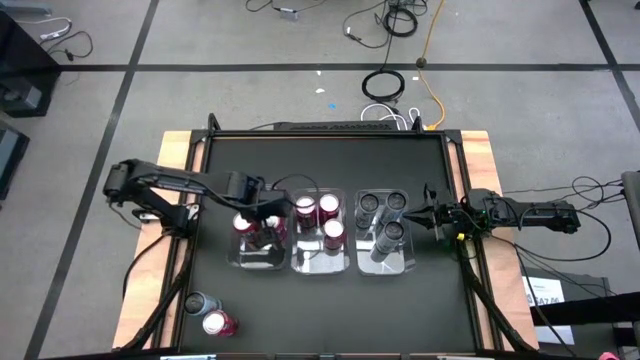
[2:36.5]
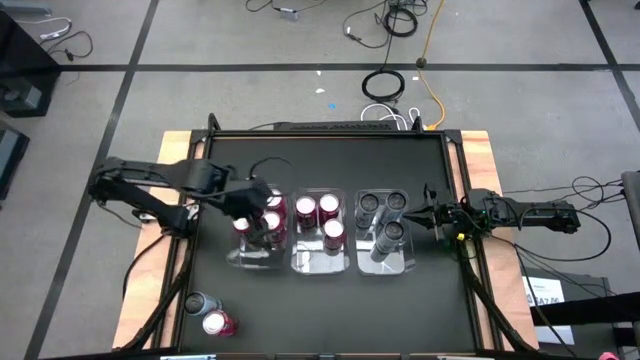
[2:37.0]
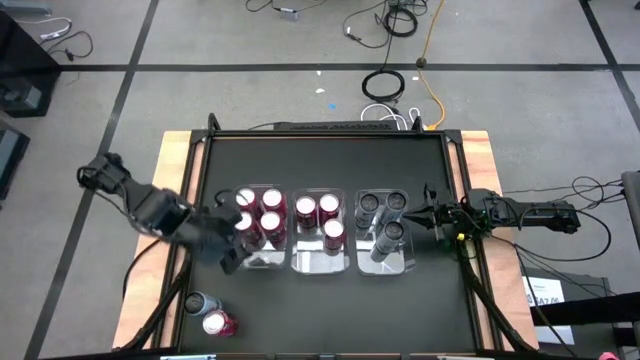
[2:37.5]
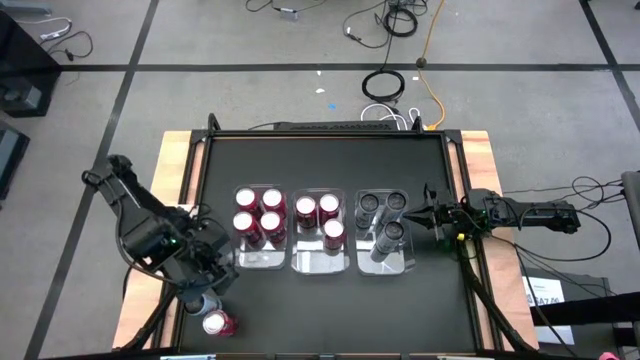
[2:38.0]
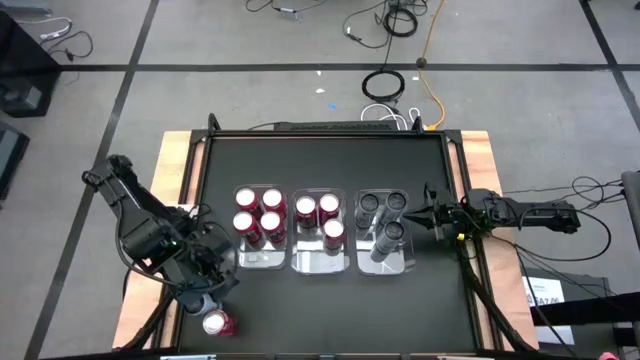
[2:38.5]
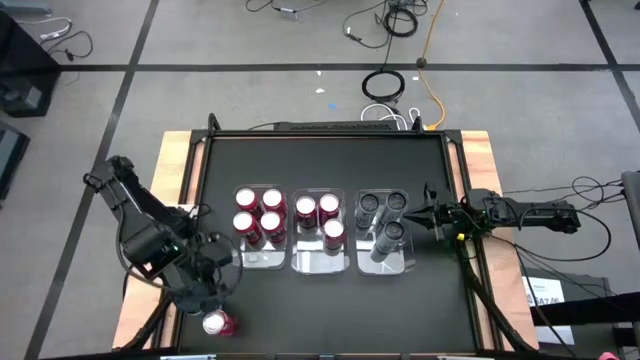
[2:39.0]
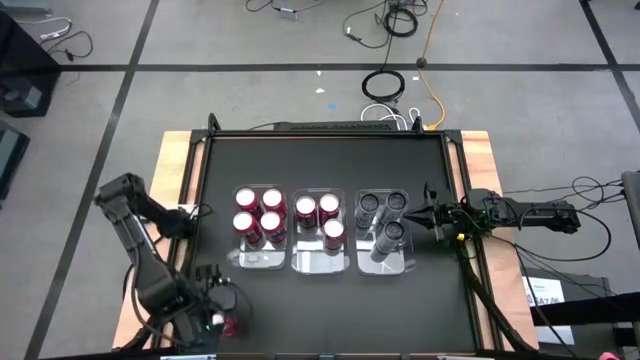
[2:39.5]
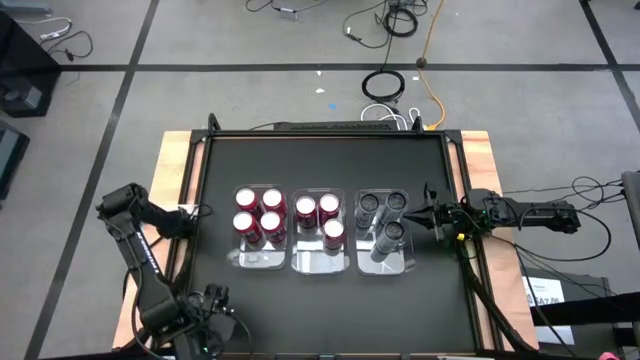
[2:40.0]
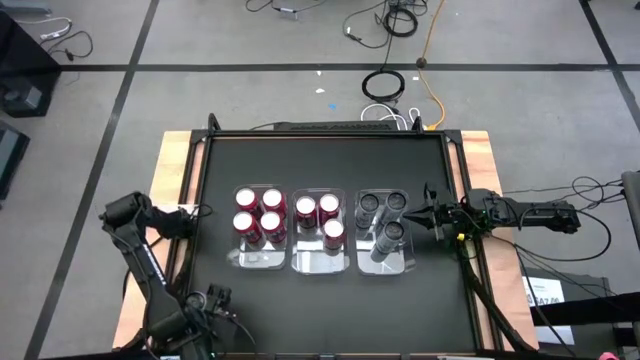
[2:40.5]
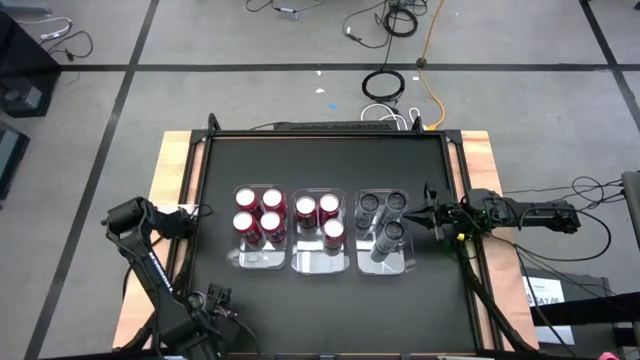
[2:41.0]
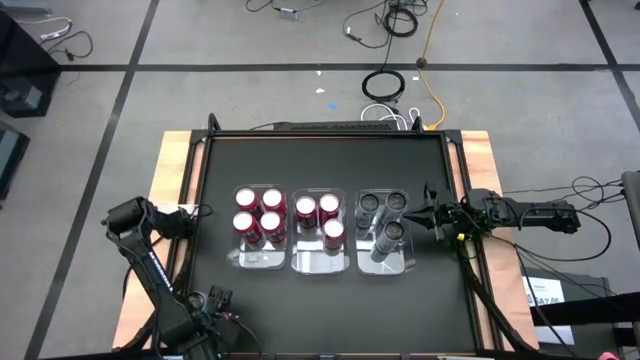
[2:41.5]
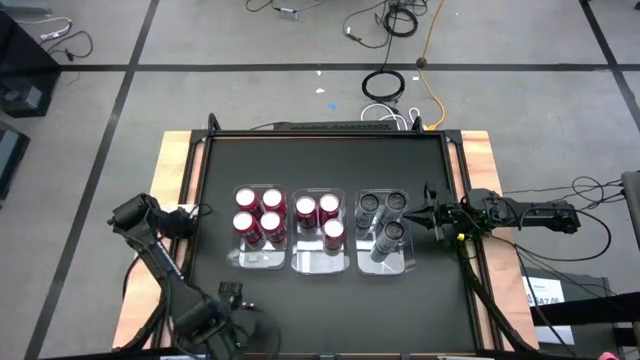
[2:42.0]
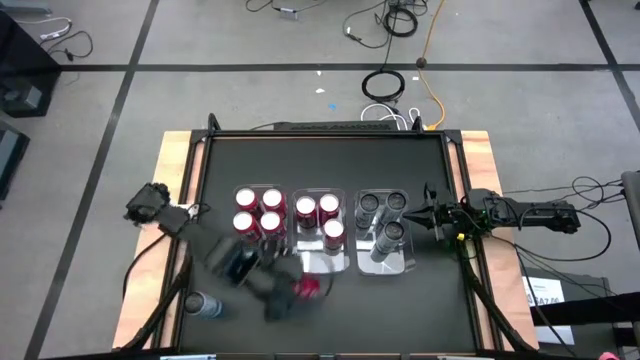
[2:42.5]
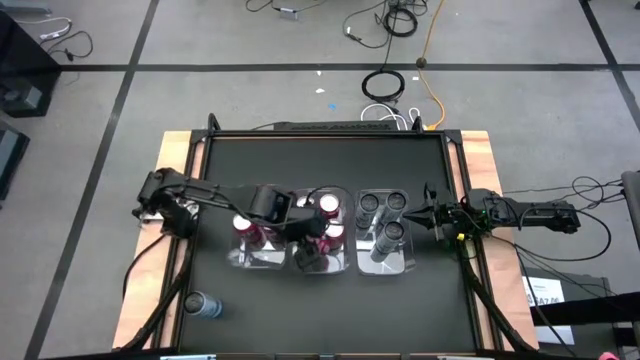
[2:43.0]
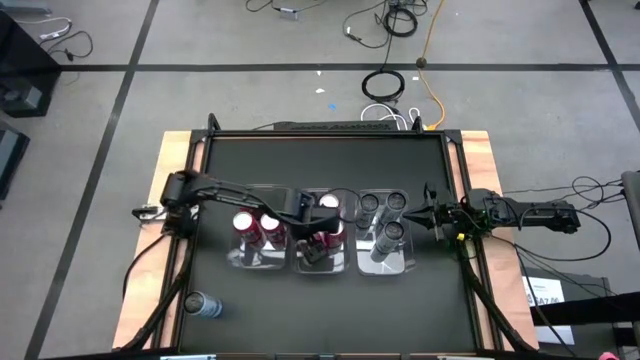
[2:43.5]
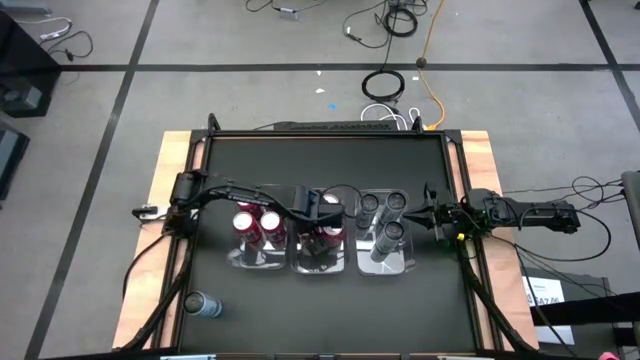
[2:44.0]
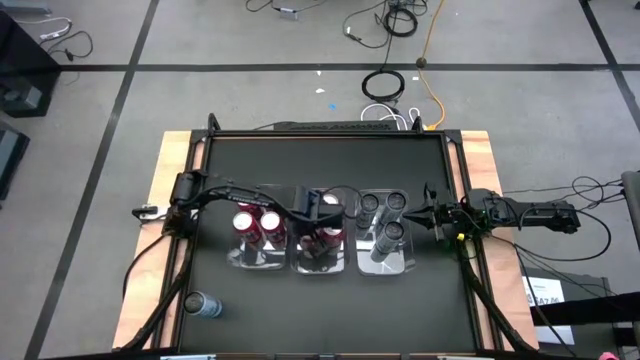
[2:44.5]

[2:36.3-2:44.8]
Task: Sort soda cans
Put the red white soda can into the middle transparent bin

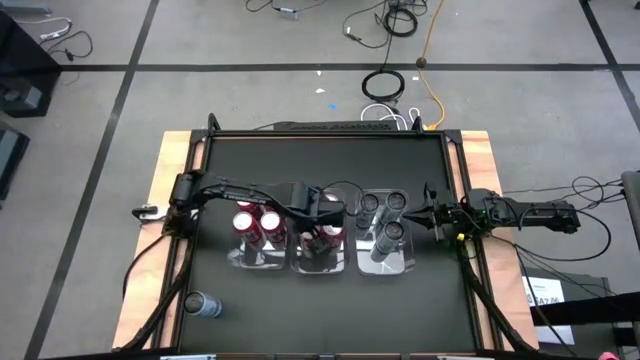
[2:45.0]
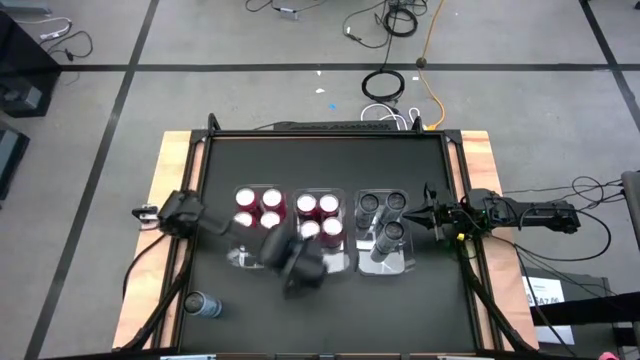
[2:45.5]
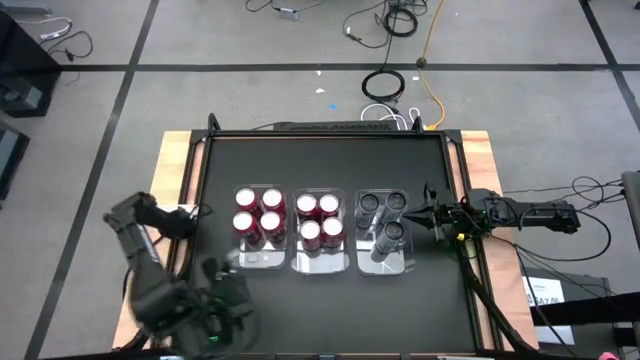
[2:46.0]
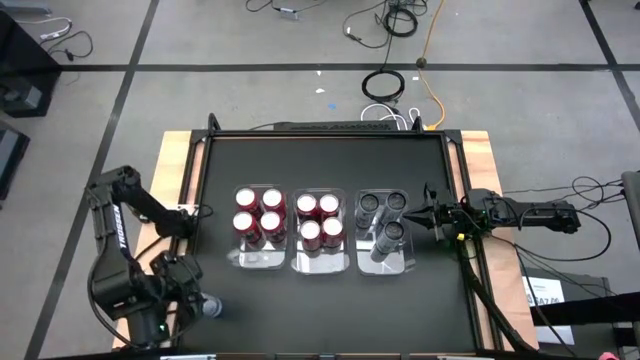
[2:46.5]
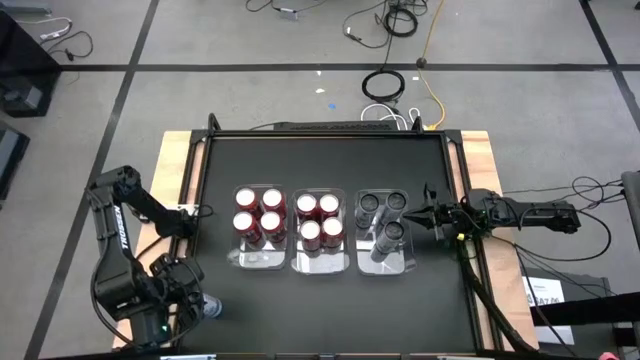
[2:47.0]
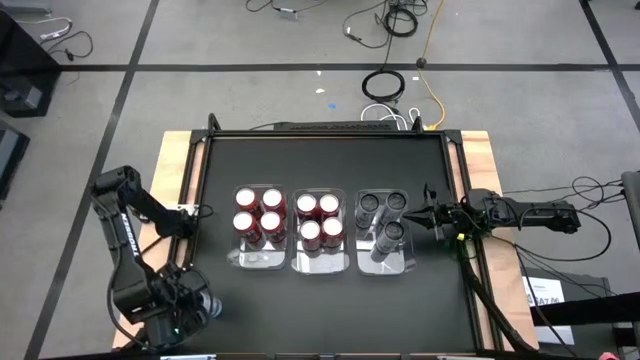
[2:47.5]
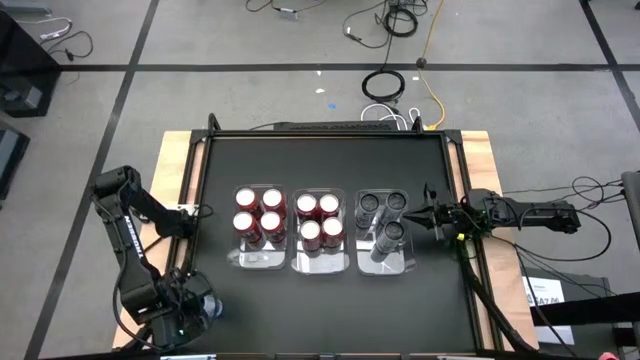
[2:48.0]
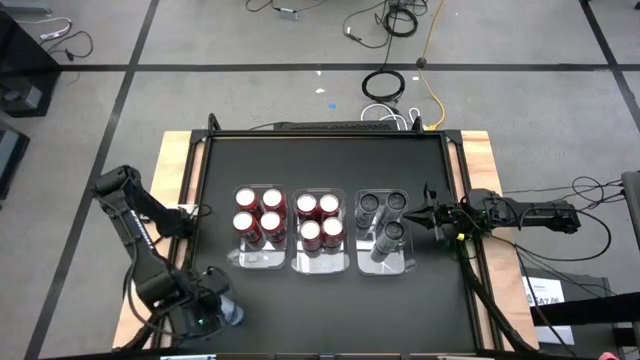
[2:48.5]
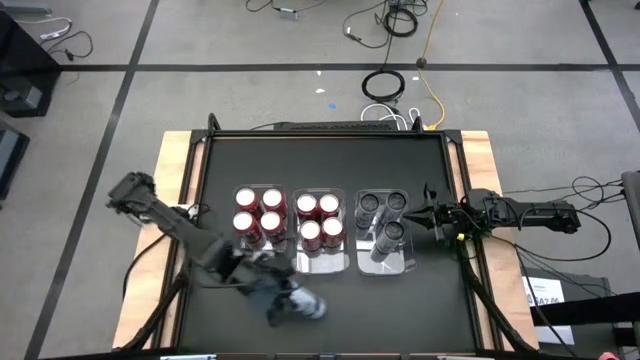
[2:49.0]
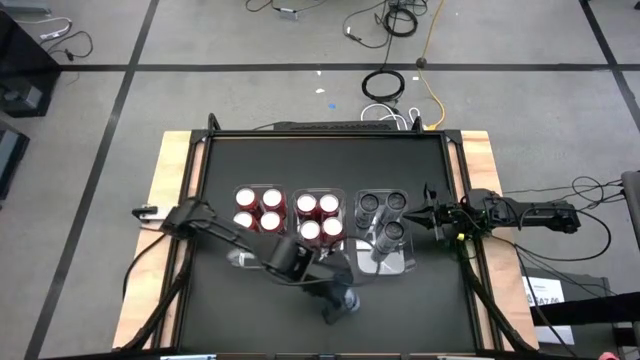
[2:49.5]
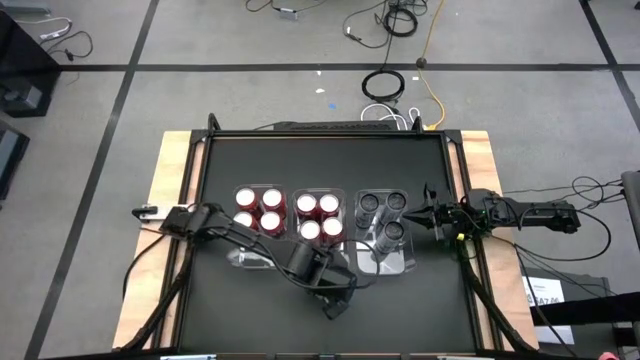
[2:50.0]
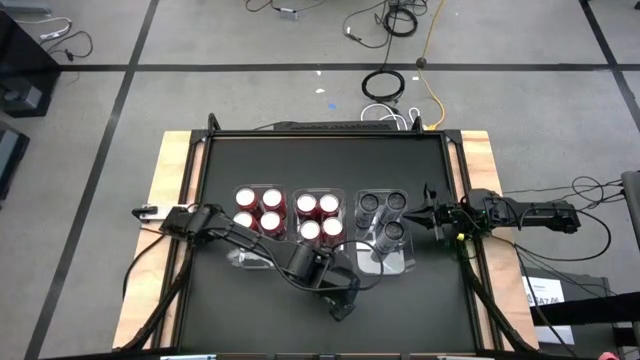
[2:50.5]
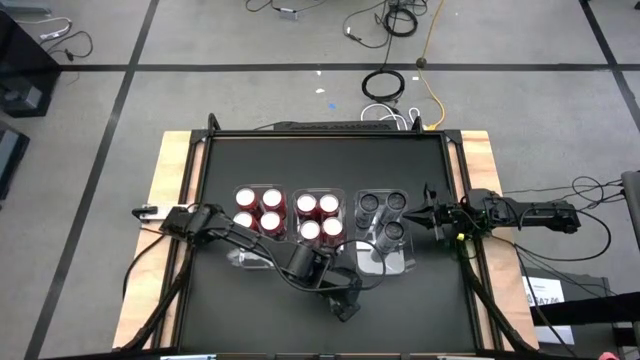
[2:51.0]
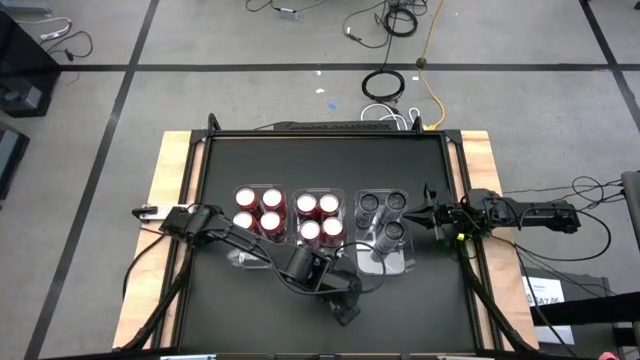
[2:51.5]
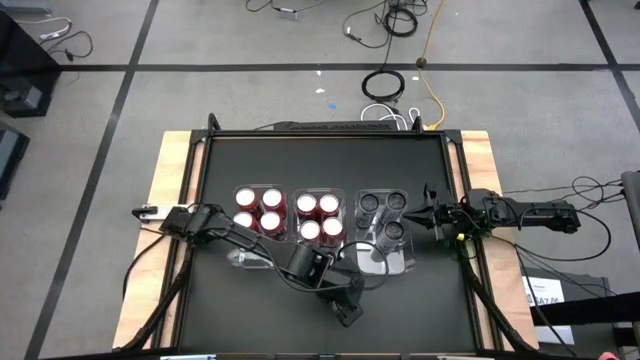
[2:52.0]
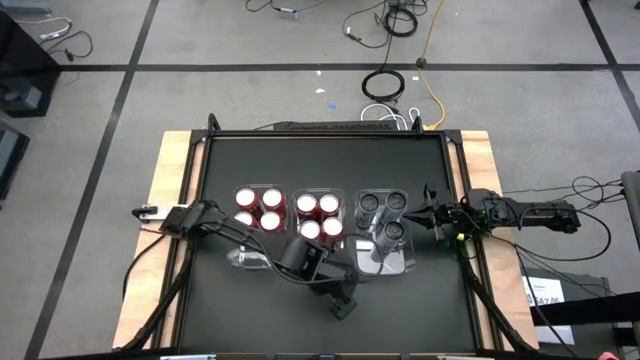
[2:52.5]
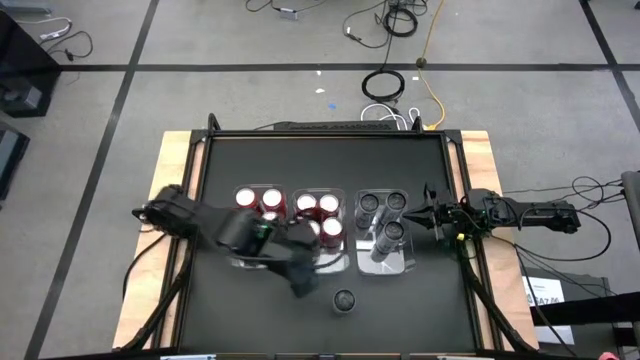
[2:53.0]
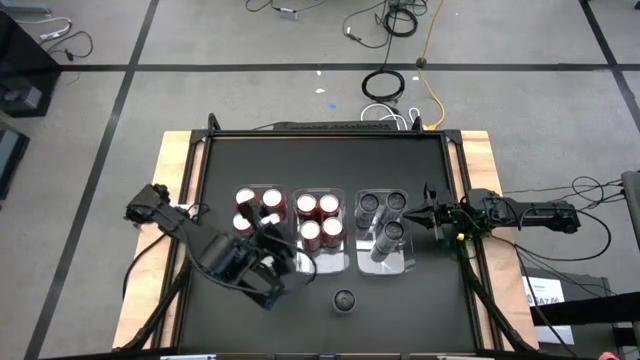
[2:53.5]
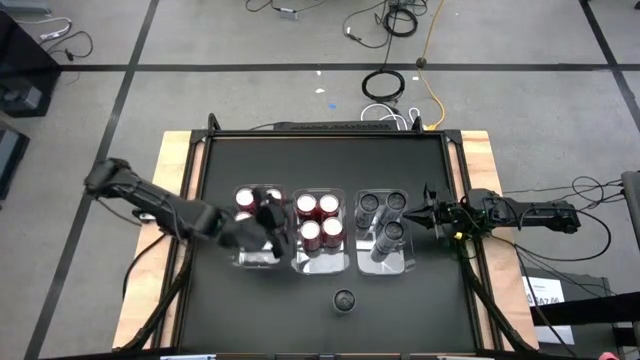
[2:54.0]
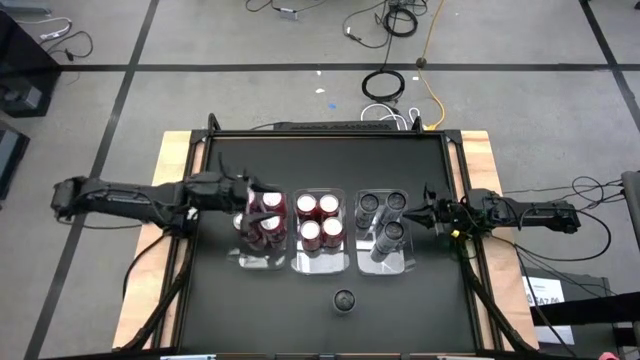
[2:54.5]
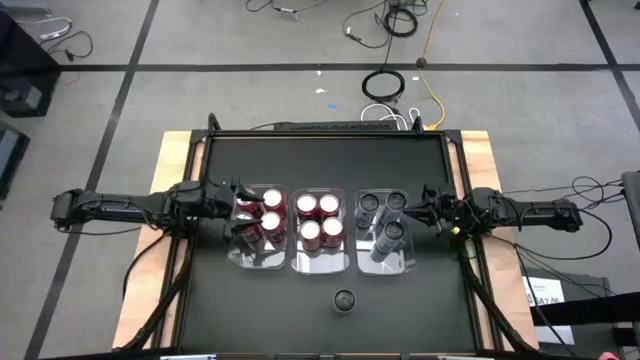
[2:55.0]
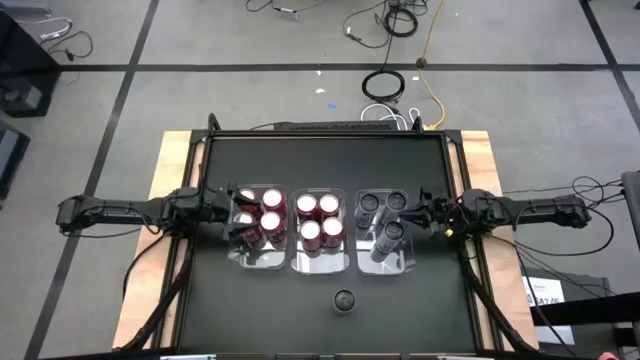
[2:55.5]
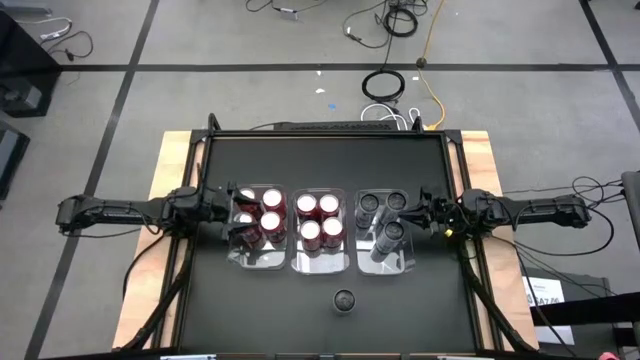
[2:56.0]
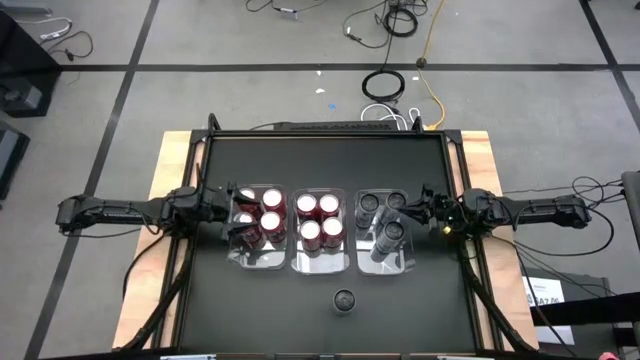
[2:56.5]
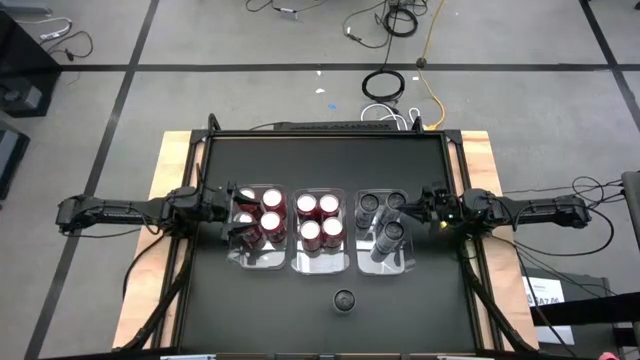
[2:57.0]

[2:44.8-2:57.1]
Put the white blue soda can into the right transparent bin
